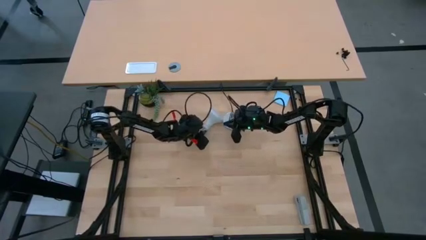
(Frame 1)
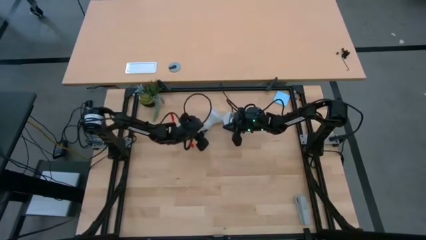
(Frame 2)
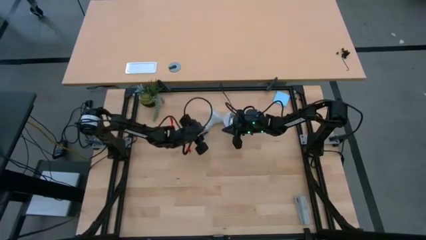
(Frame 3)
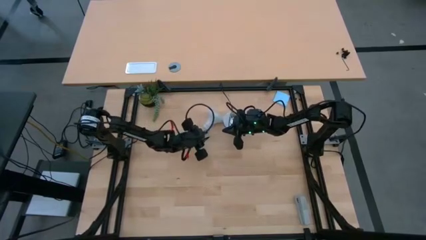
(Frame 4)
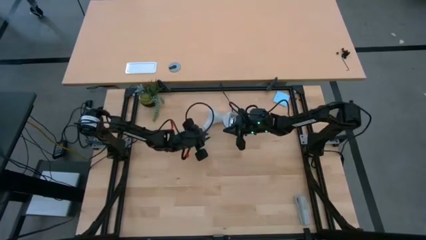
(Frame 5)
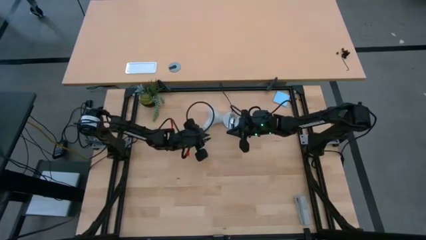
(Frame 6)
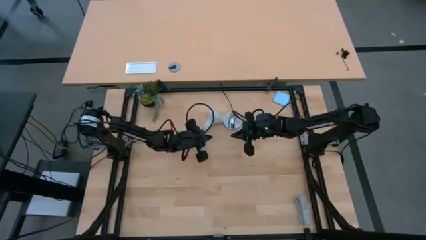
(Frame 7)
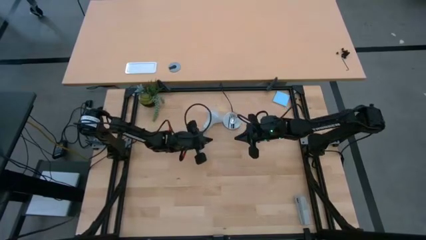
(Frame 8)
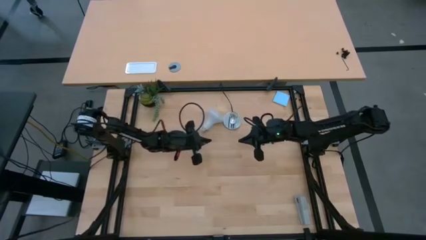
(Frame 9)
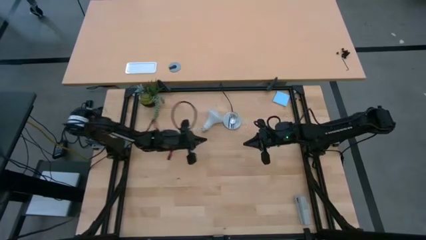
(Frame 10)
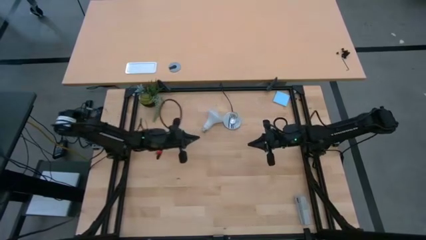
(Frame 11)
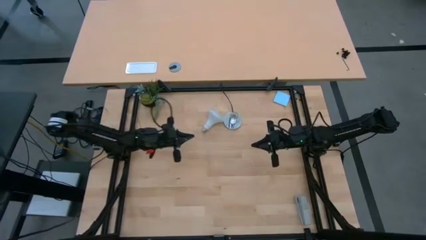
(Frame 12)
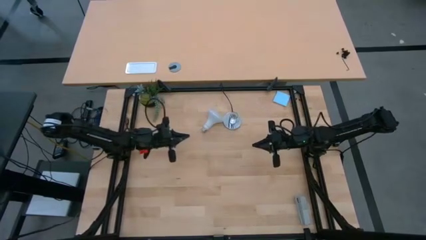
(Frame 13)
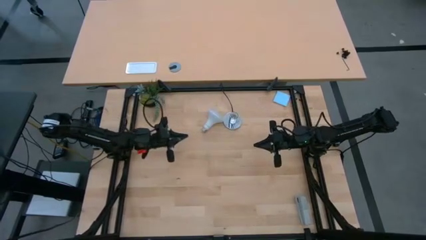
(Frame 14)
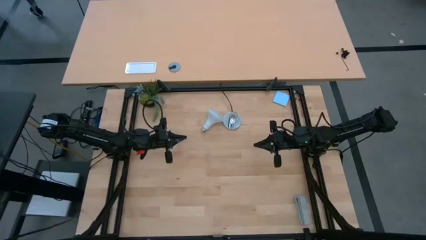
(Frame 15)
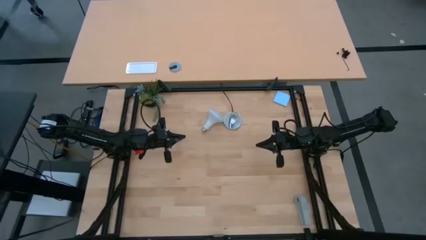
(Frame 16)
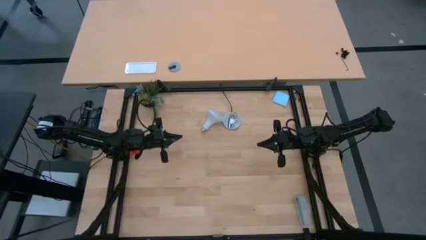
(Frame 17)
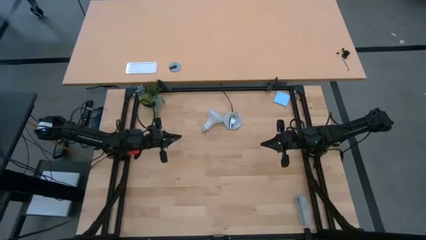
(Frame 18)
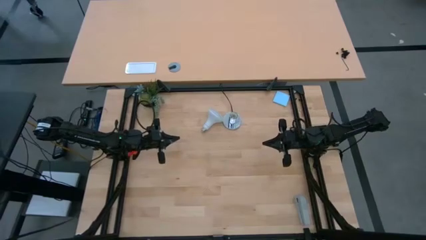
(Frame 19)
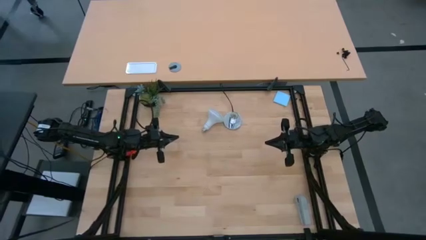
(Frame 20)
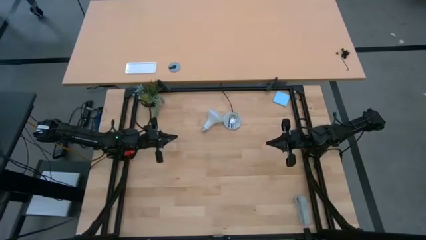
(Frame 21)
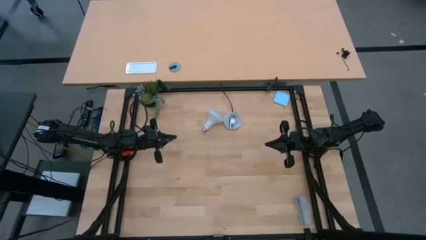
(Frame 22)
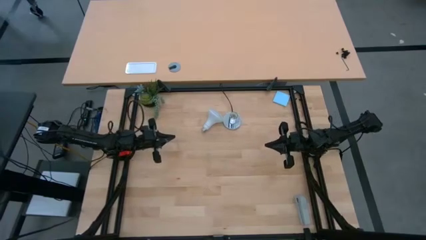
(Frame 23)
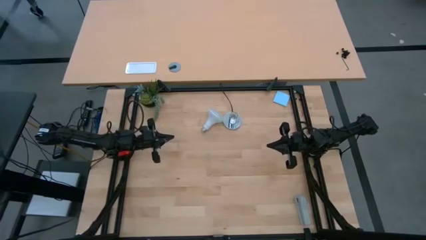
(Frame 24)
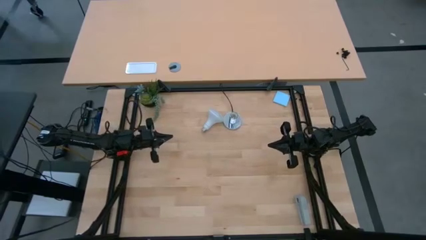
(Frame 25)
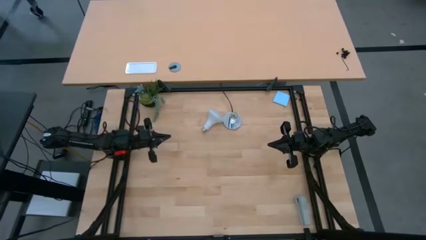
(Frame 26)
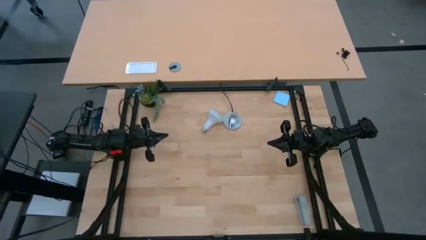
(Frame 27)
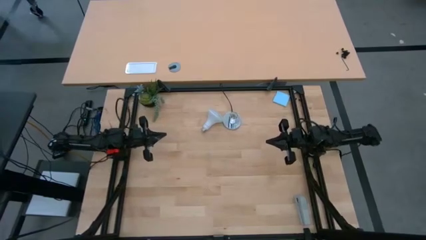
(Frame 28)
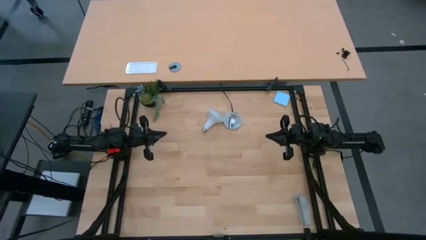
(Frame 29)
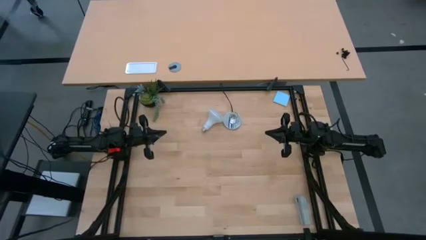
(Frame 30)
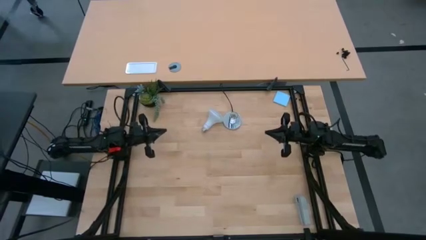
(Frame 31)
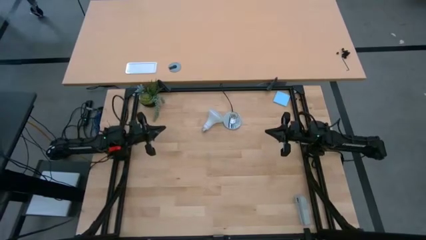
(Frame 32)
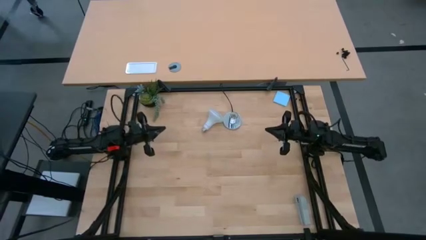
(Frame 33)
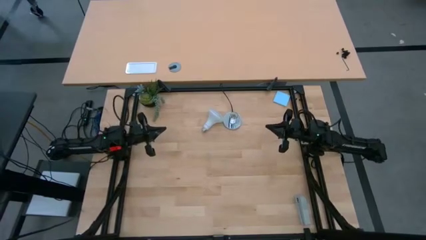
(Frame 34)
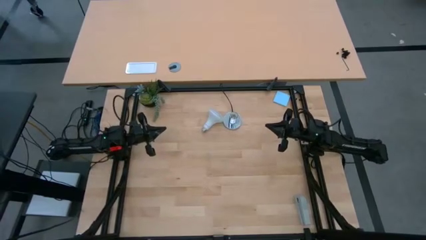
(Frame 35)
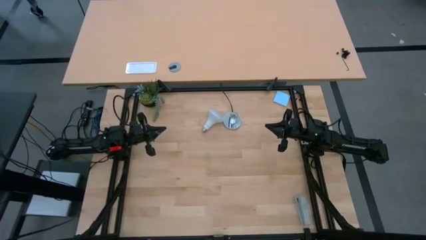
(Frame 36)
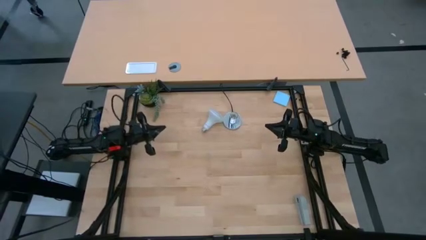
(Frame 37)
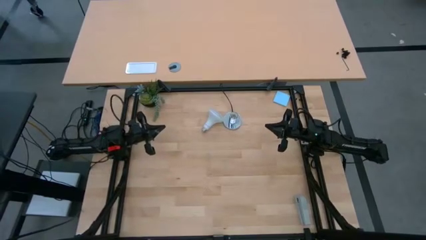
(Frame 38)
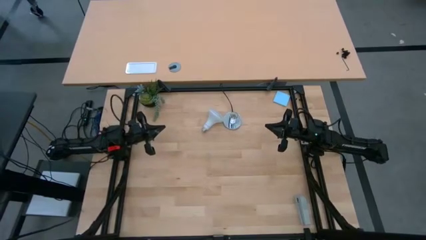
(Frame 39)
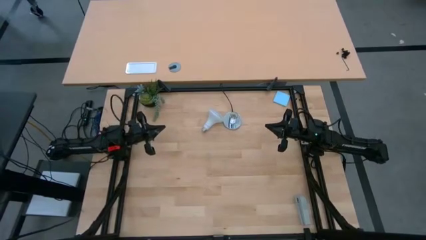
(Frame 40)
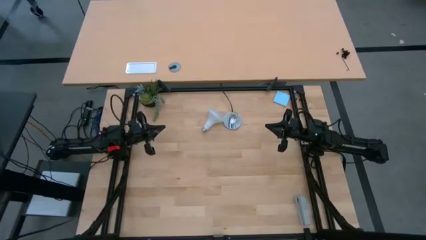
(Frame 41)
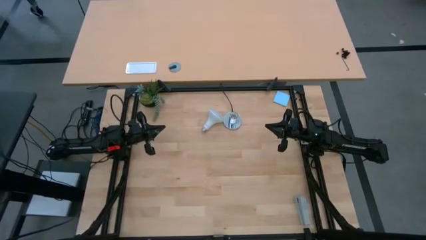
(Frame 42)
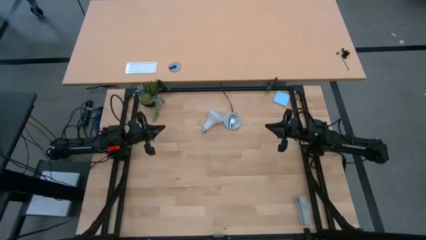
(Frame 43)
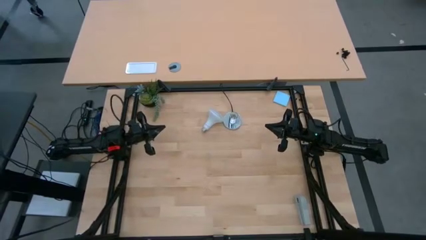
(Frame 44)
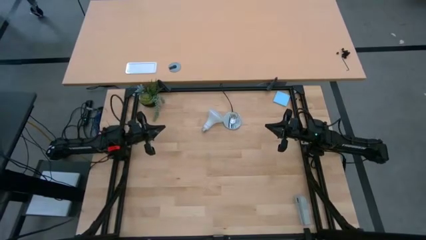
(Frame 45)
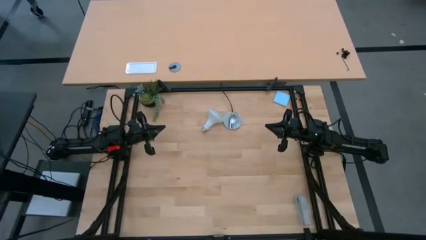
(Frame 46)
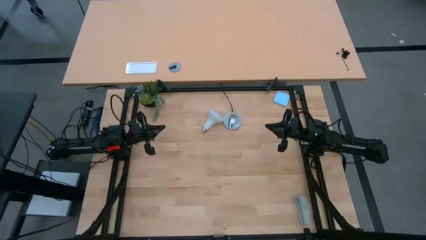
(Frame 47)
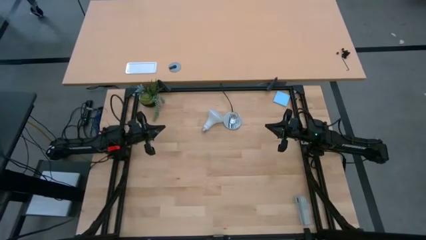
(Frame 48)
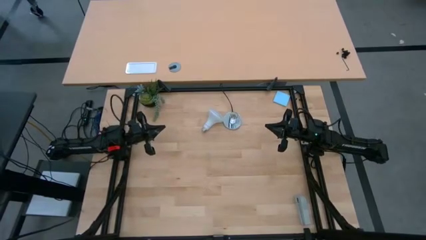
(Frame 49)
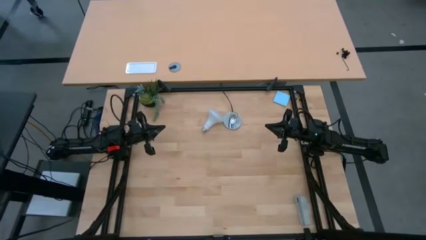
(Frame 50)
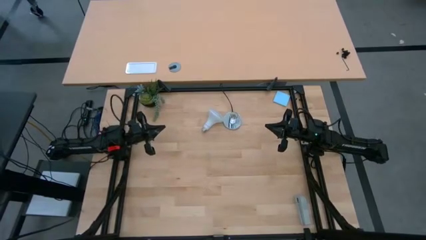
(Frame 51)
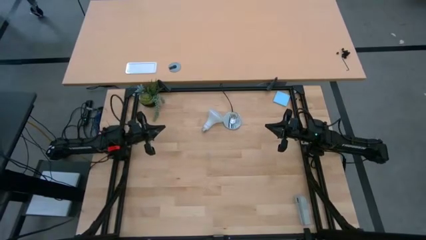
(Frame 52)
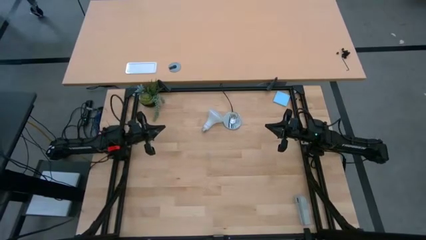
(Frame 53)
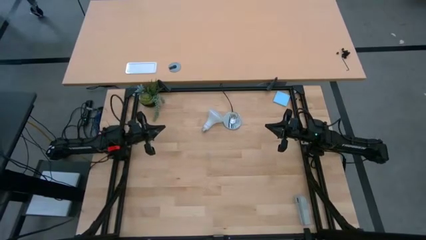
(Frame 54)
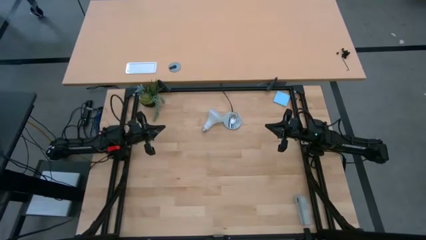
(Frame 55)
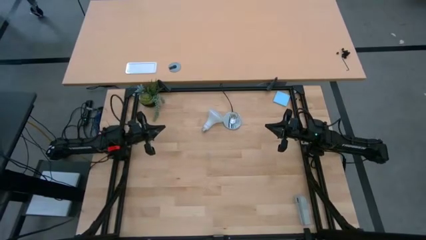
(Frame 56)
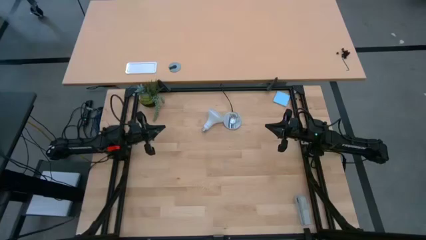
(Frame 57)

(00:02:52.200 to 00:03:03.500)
Task: Screw lightbulb
Return to Home Position

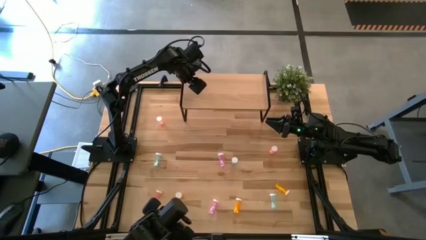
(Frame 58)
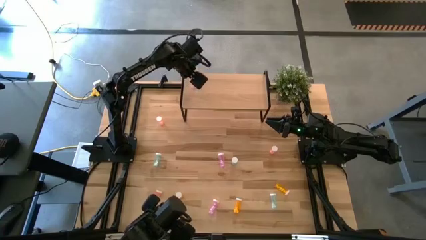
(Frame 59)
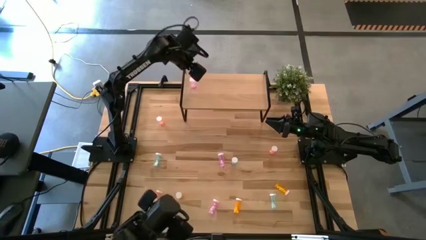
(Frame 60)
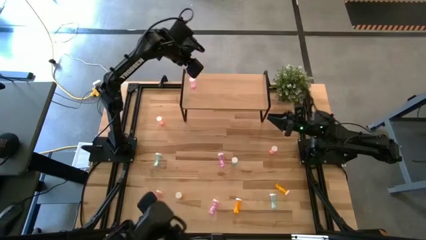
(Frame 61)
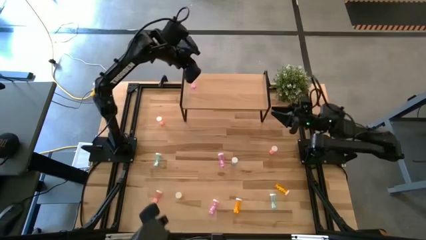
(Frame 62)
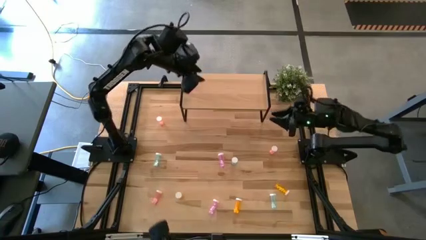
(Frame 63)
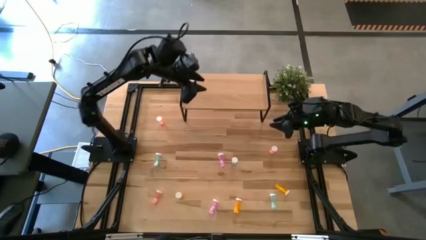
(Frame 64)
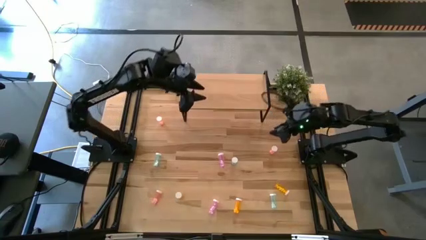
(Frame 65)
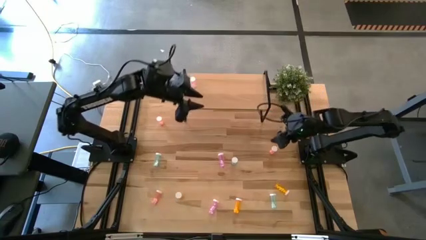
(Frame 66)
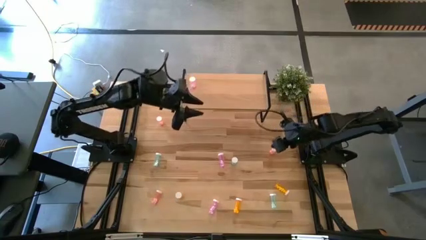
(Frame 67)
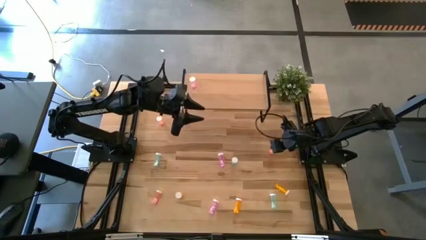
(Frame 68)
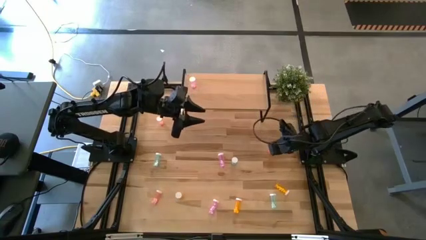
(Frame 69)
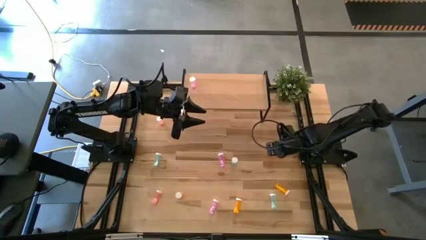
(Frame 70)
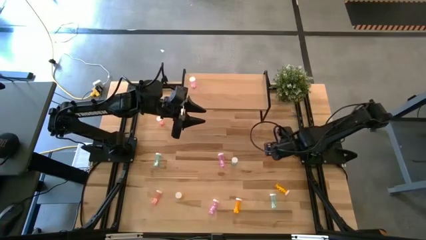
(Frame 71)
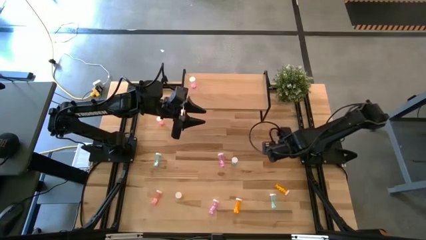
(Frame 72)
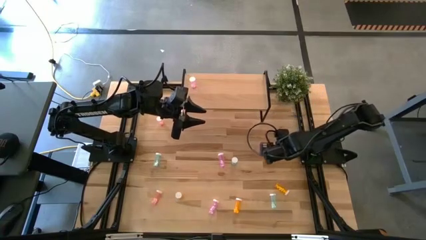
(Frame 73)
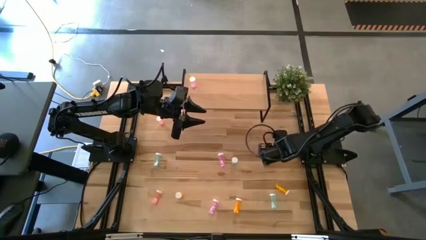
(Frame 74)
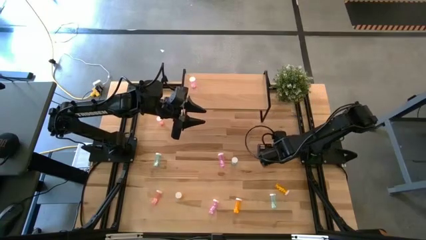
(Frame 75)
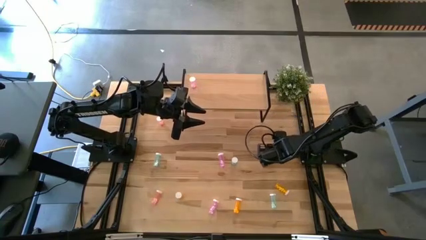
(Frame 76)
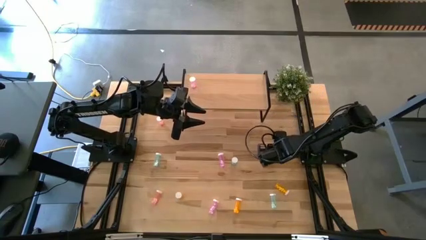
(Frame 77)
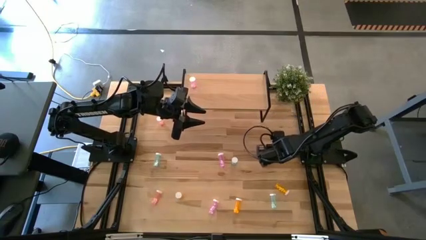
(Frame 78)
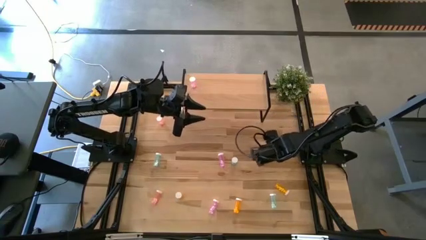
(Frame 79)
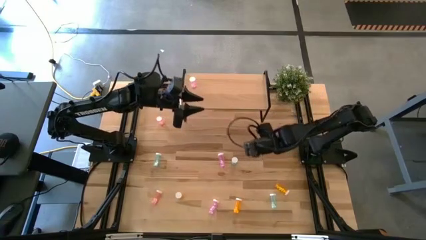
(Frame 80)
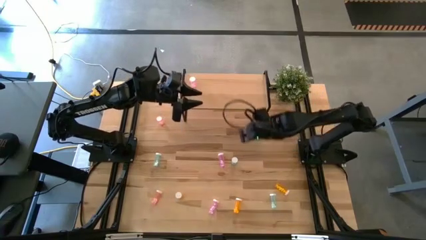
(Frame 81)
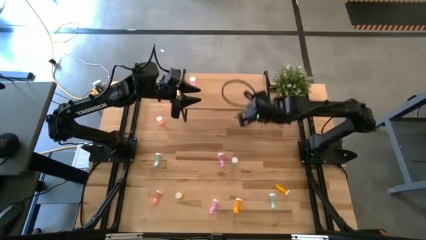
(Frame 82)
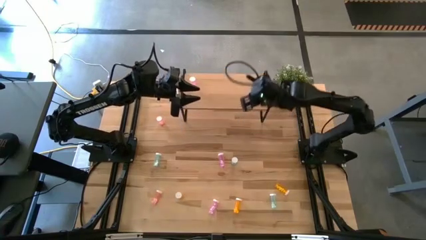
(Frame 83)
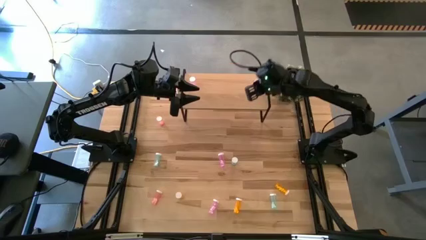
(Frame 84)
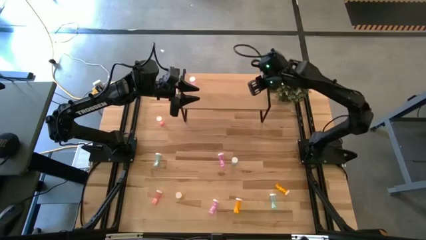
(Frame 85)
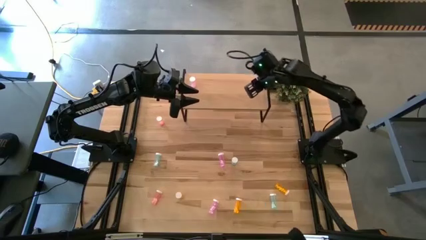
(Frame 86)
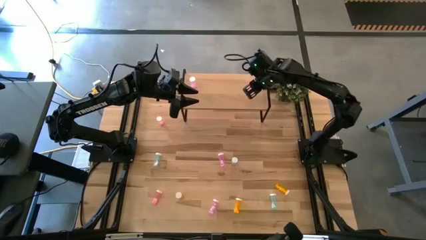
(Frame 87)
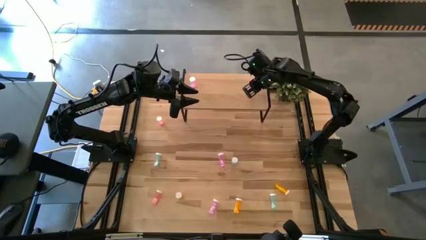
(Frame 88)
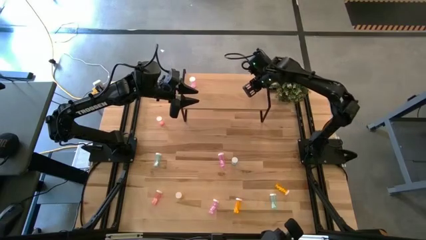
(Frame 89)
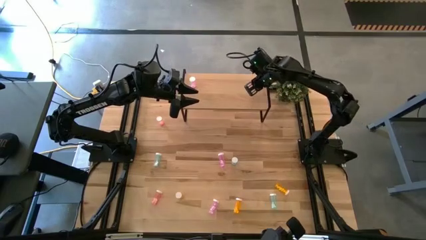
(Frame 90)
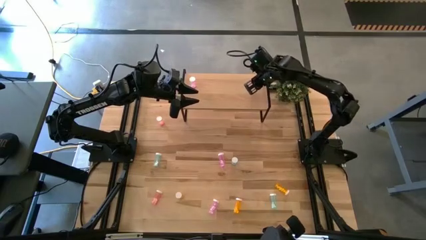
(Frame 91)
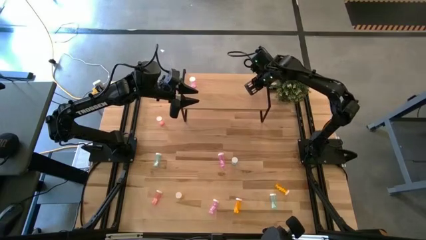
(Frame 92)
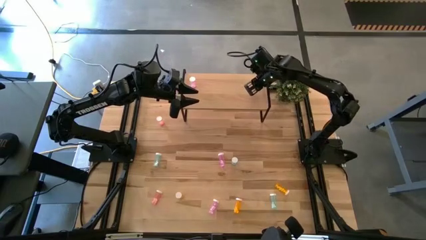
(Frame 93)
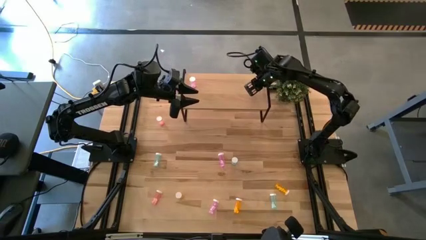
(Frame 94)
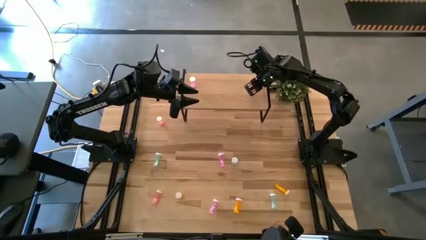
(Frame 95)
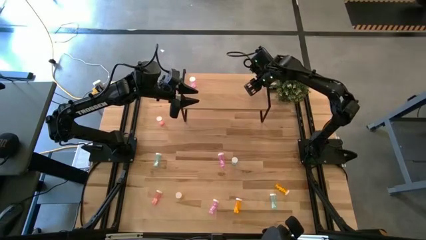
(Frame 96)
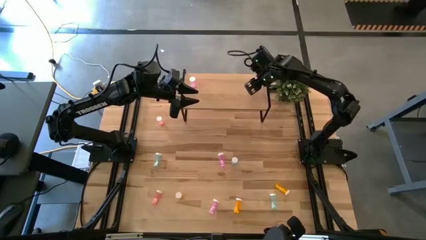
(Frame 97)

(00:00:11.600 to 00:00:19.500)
Task: Pick and place medicine bottles onto shelf by color
Put the top right pink pill bottle on the shelf
